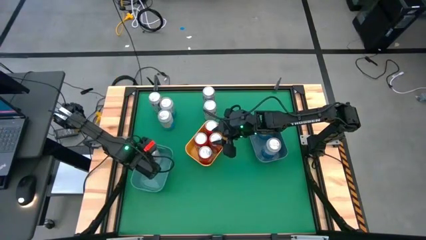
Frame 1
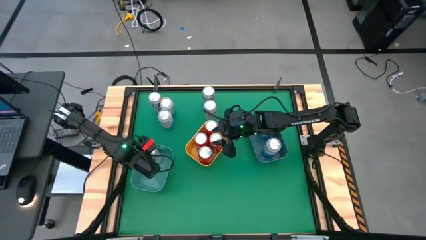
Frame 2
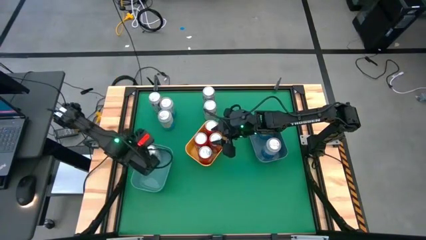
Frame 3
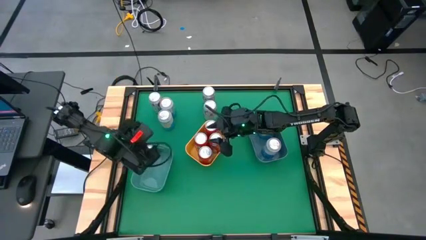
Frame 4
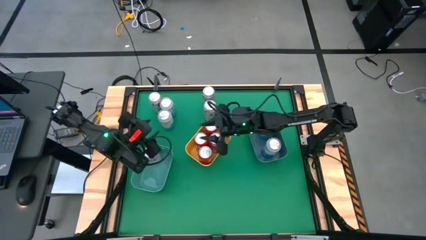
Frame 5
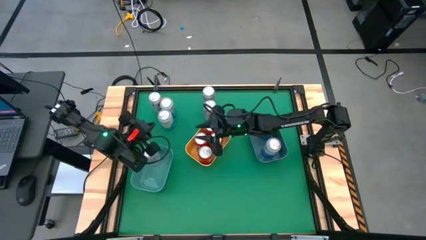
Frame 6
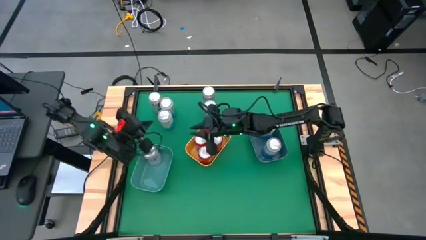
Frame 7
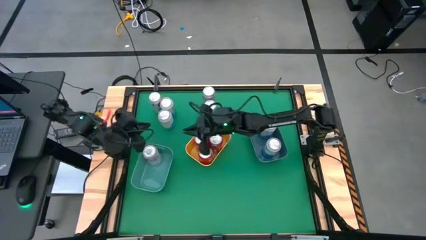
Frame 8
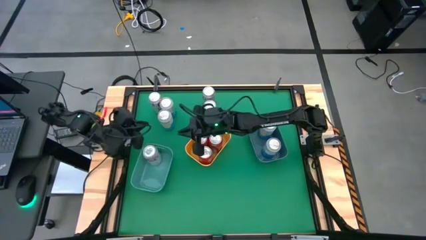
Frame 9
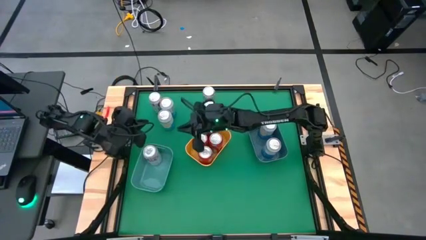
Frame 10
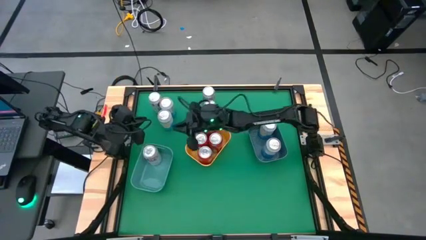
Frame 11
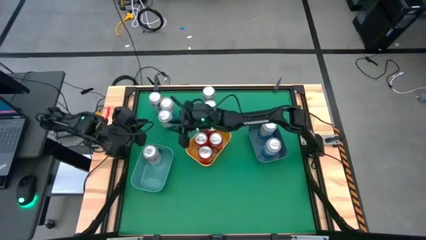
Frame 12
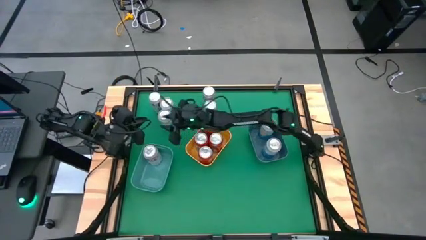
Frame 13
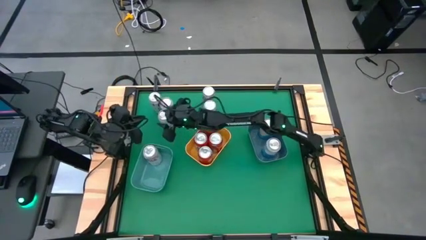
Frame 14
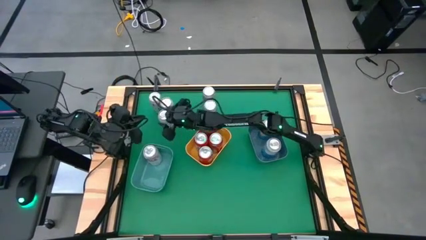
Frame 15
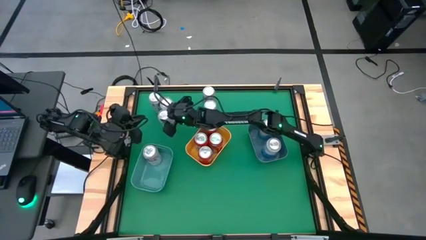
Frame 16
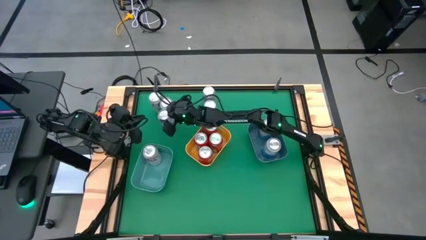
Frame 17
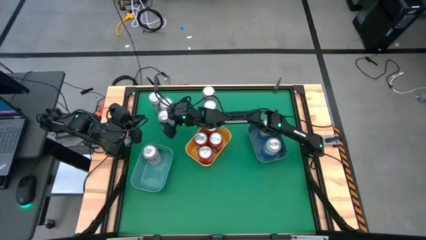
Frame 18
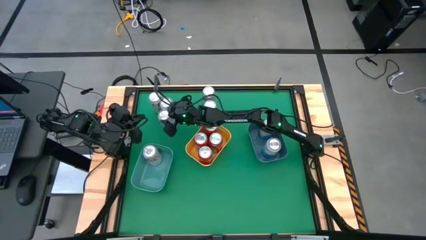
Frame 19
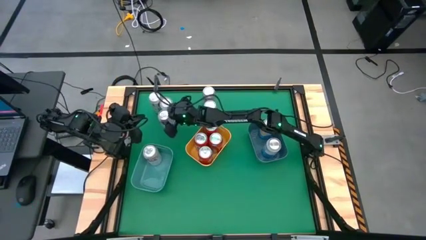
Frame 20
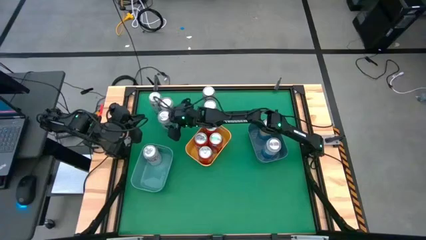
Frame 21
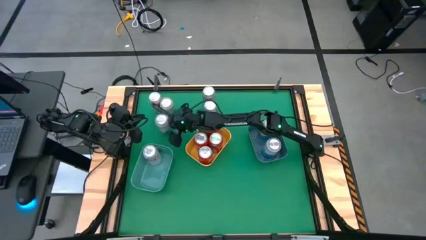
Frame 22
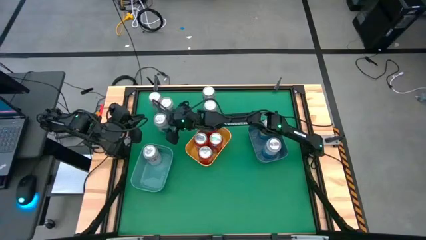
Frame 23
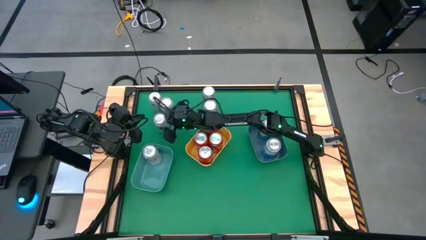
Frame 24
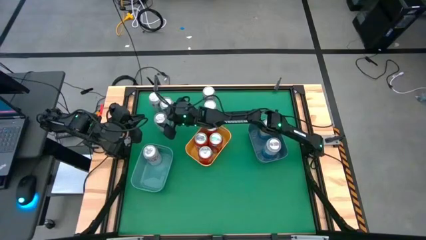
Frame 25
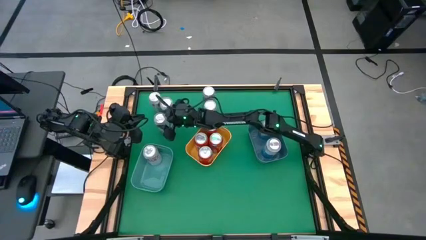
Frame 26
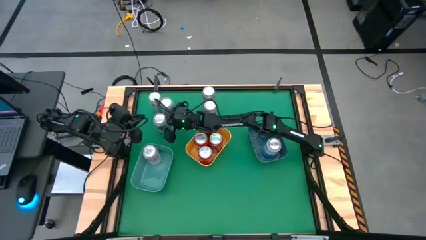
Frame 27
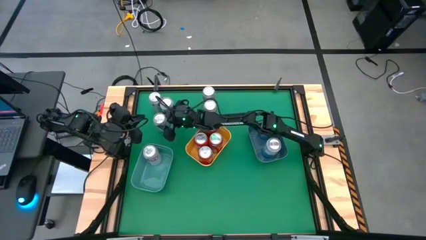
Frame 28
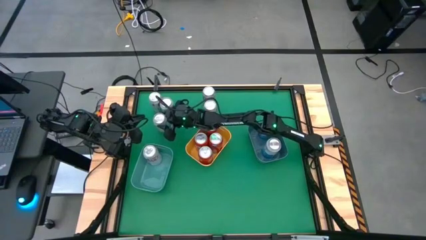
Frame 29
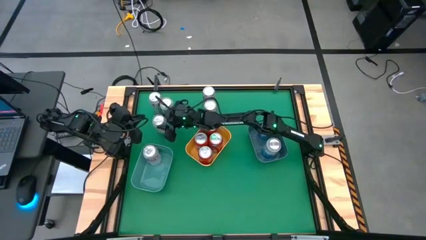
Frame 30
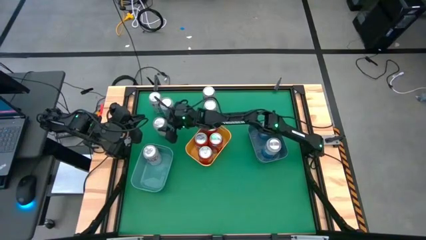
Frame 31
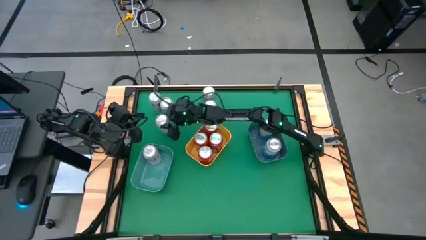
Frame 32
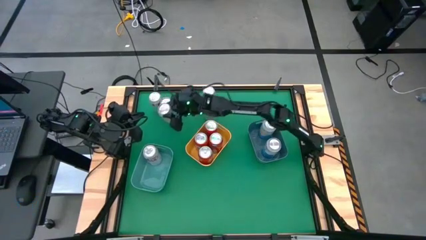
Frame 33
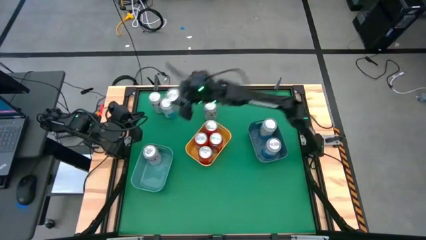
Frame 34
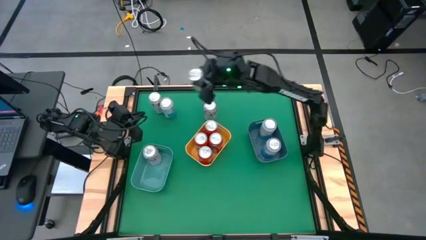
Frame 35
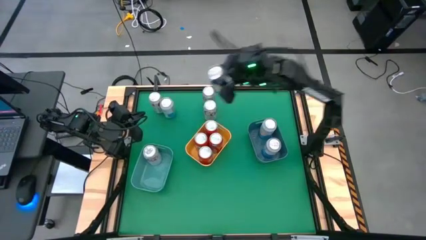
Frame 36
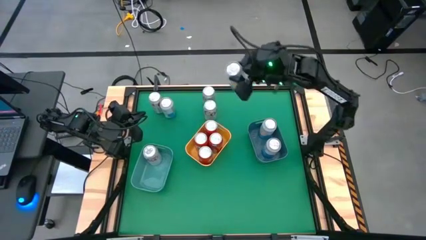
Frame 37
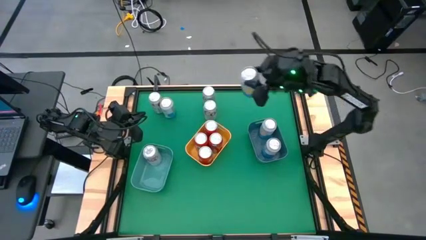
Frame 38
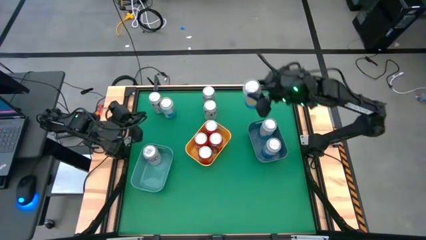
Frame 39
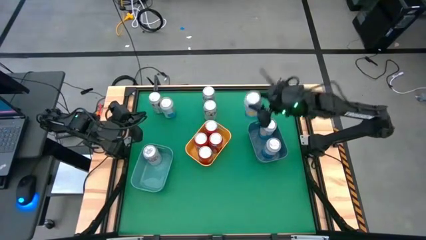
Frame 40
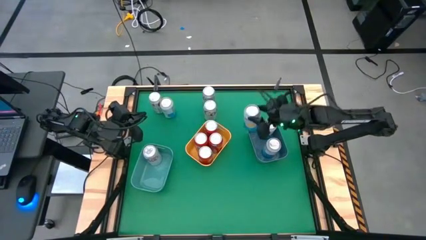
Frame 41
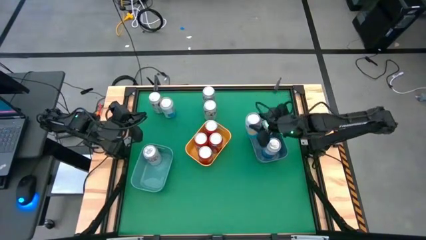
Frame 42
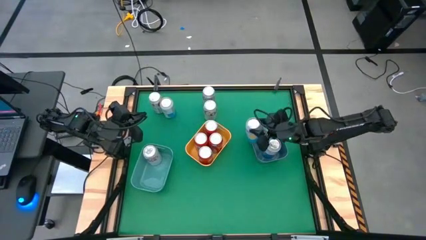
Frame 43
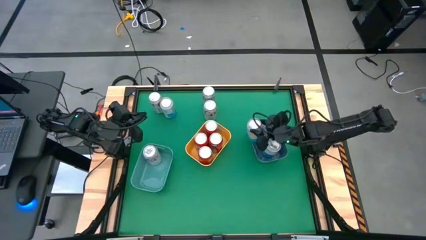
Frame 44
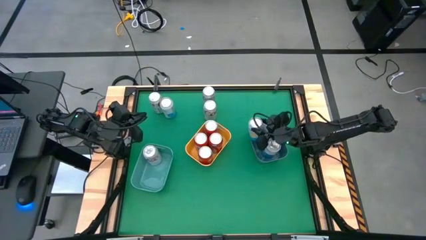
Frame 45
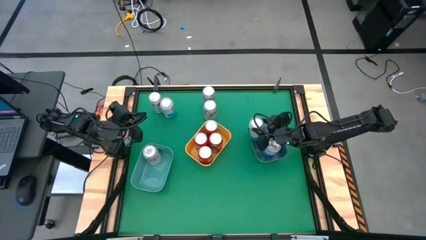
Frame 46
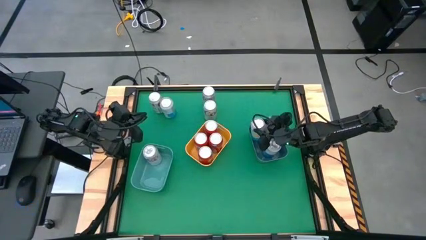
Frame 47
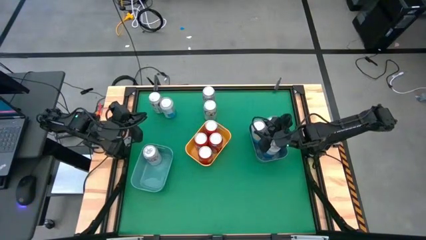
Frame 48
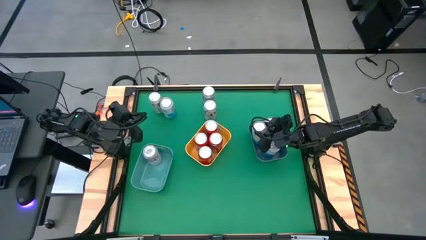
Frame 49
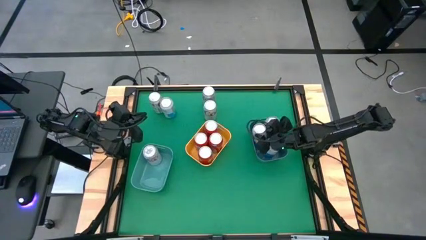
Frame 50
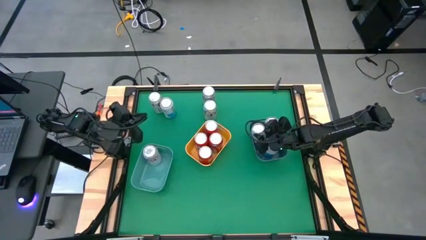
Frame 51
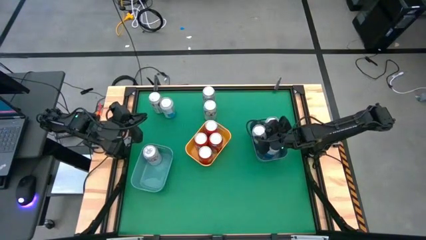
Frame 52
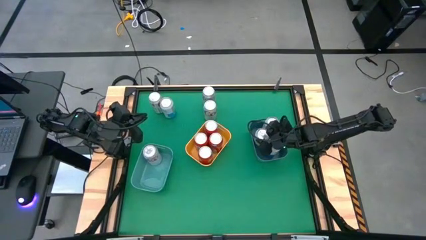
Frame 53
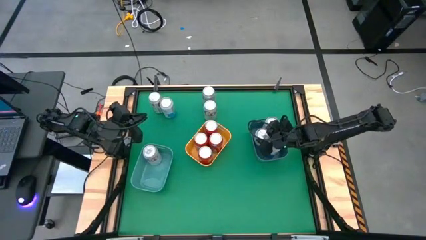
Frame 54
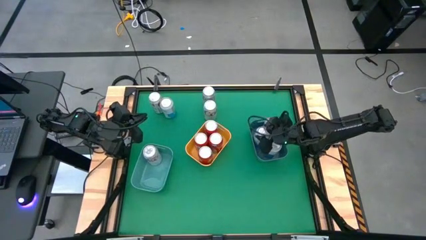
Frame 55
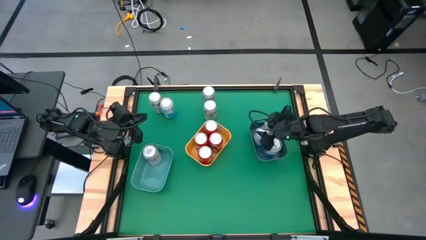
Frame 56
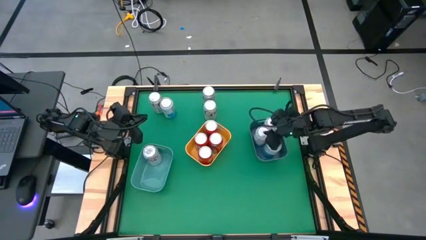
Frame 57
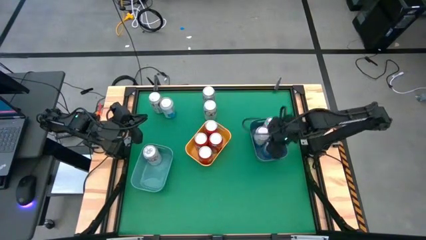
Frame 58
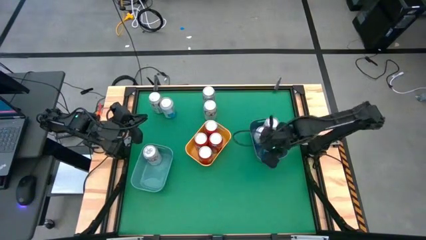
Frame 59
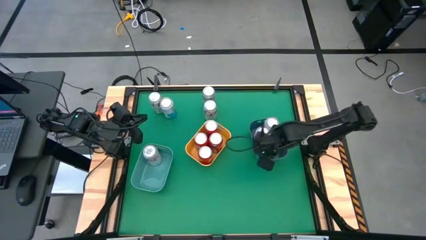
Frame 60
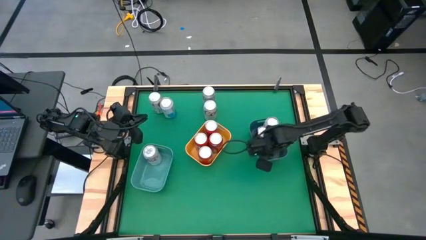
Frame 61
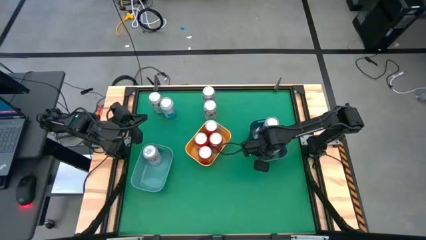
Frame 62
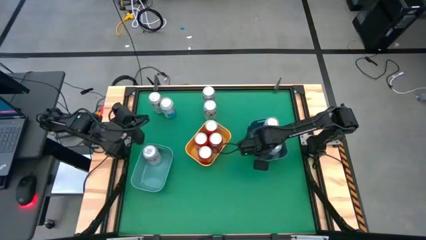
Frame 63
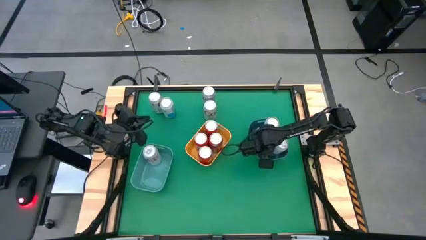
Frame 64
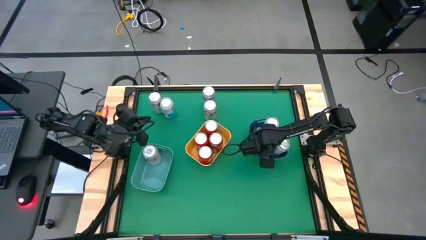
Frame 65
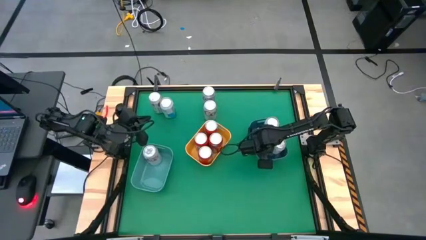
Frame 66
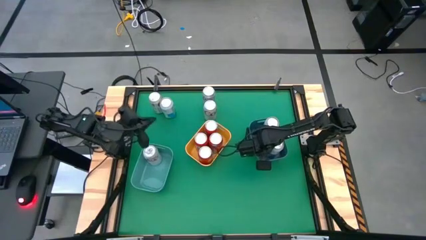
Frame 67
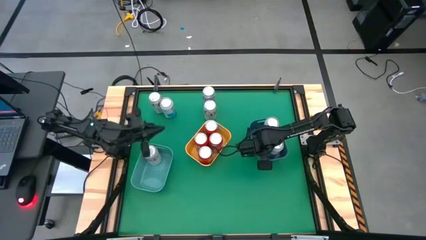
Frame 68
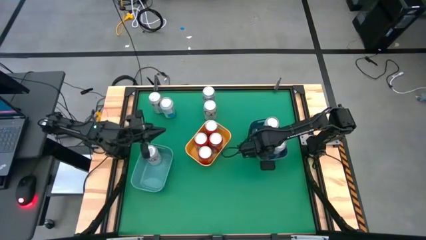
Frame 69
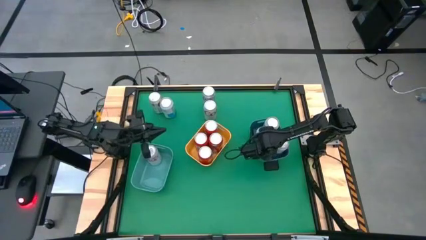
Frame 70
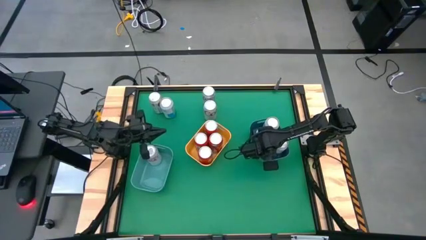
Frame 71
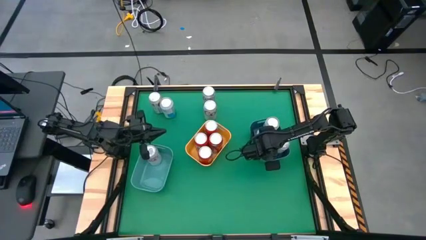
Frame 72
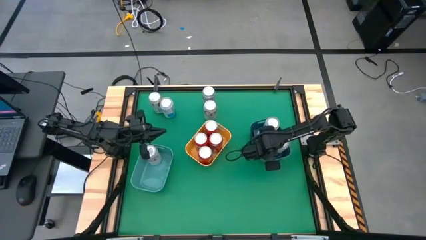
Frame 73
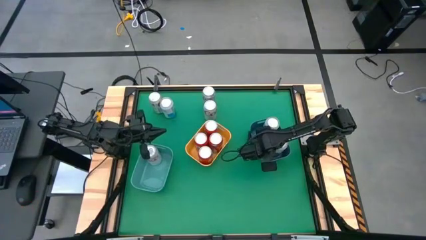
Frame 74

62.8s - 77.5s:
Task: Sort soda cans
Put the bottom blue and white soda can into the blue bin
